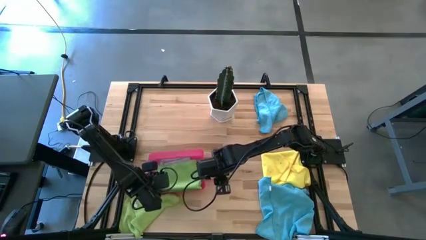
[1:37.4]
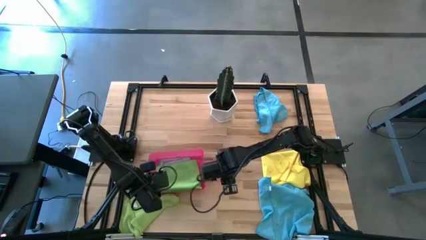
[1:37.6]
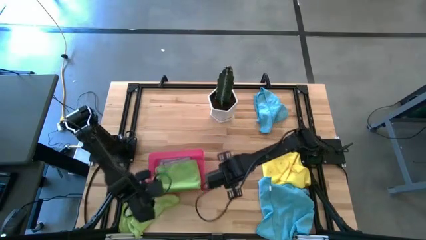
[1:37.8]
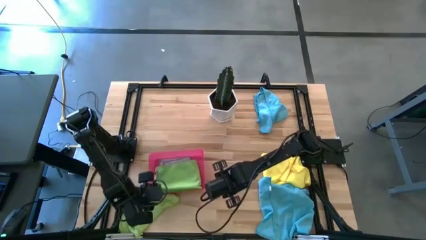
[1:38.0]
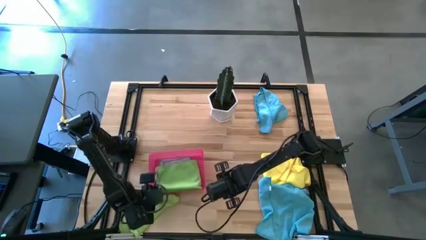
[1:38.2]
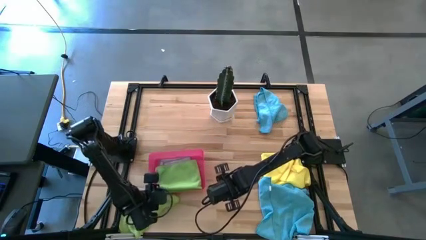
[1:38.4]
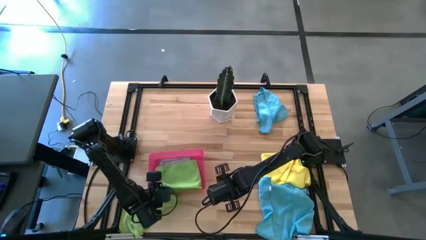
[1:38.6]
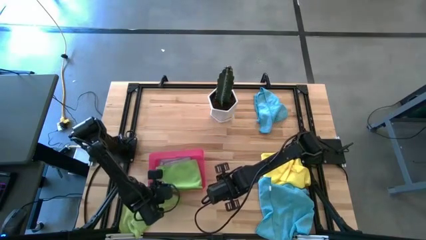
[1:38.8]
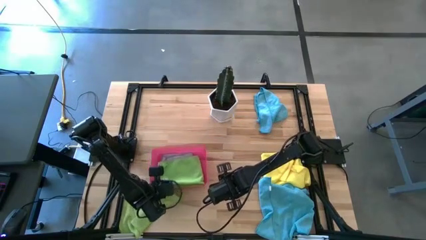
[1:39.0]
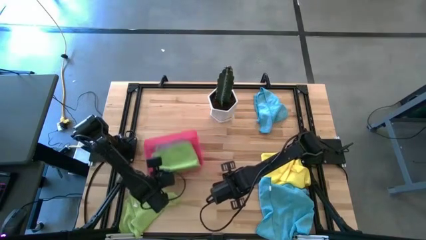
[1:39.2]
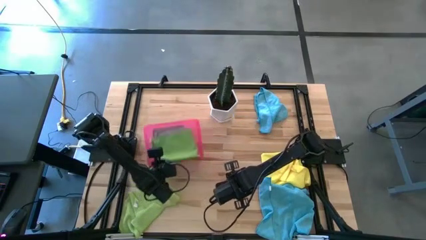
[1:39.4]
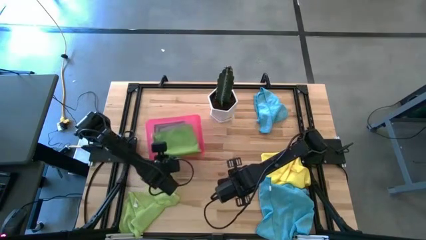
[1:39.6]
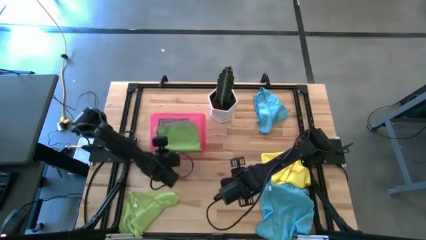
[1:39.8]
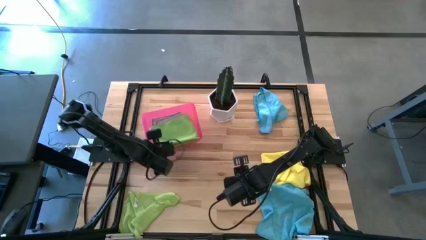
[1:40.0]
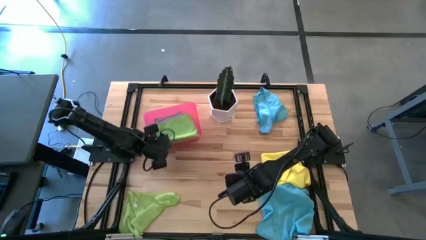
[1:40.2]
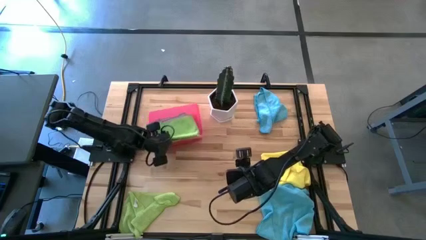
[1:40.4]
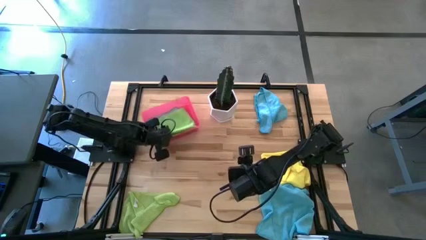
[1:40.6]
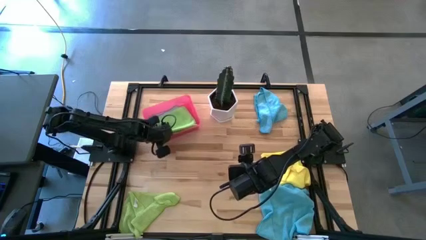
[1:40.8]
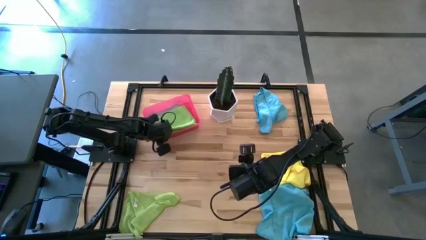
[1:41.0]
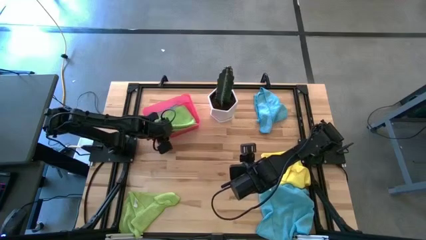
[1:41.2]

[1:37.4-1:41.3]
Task: Fold microfiber towels
Move the transparent pink bin to the top left of the table

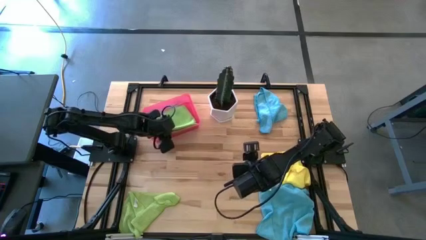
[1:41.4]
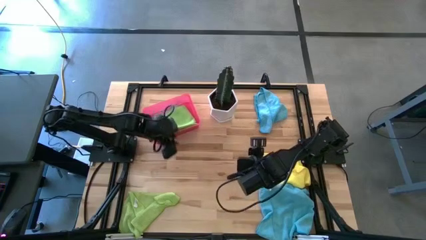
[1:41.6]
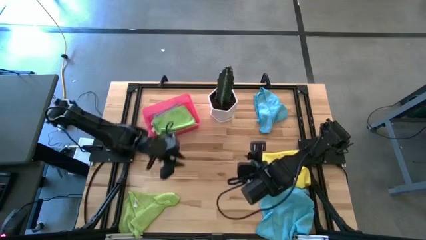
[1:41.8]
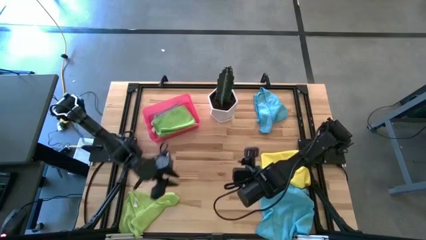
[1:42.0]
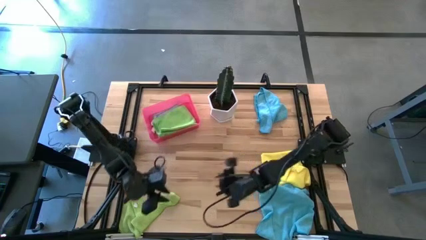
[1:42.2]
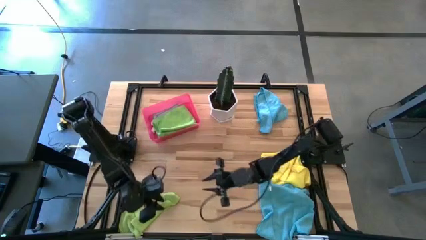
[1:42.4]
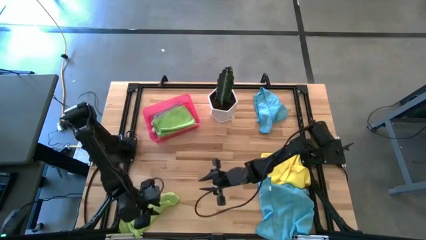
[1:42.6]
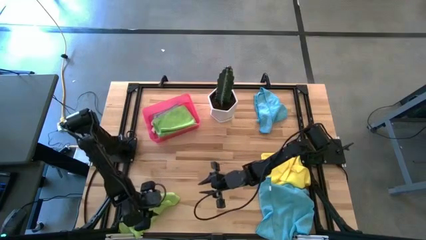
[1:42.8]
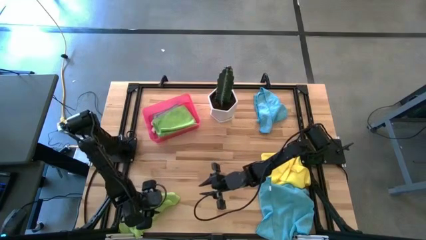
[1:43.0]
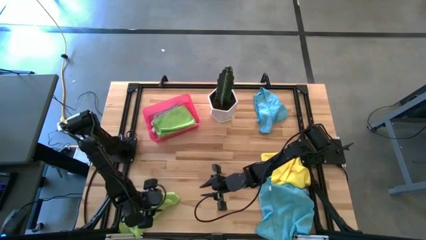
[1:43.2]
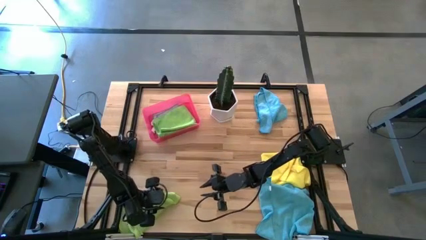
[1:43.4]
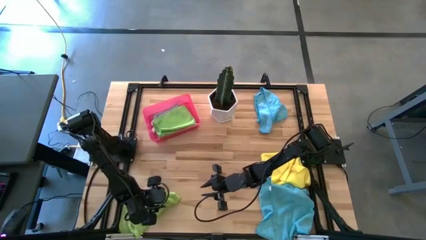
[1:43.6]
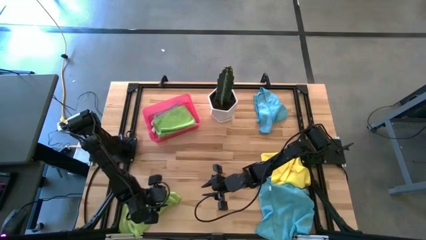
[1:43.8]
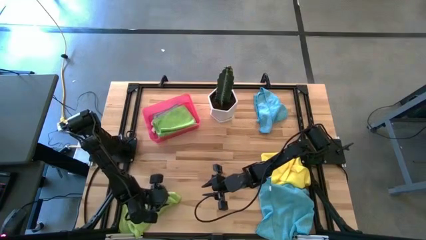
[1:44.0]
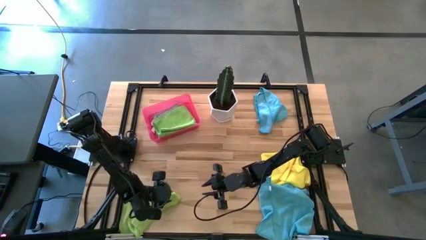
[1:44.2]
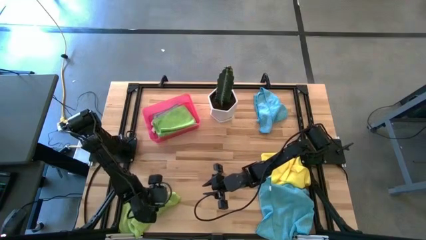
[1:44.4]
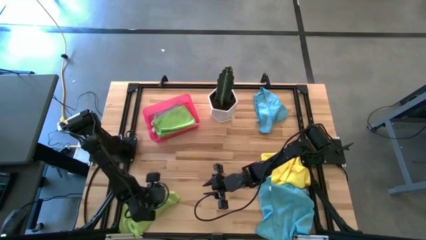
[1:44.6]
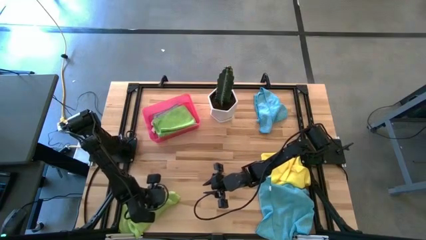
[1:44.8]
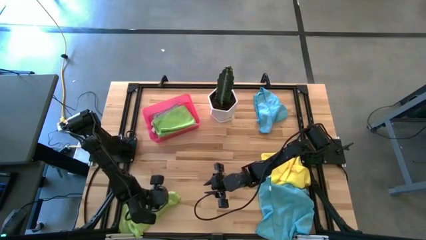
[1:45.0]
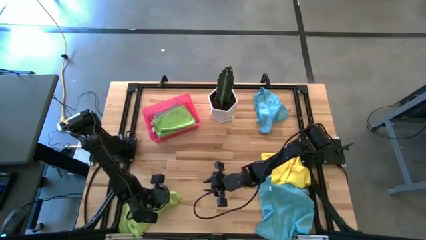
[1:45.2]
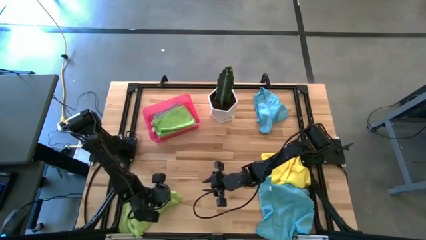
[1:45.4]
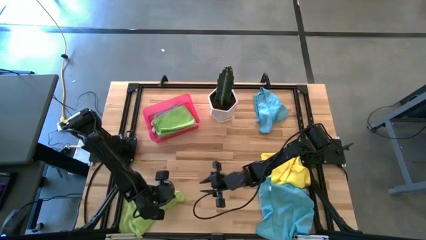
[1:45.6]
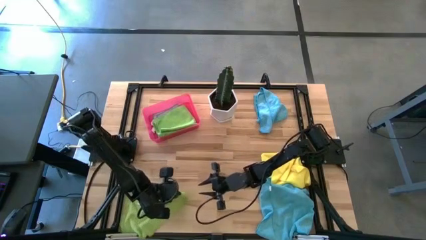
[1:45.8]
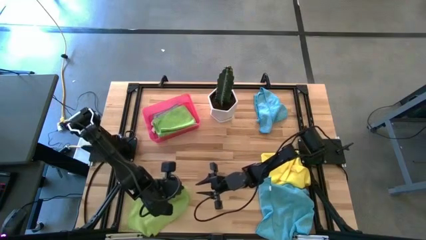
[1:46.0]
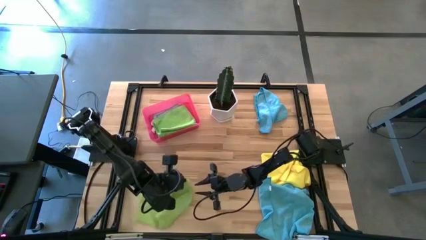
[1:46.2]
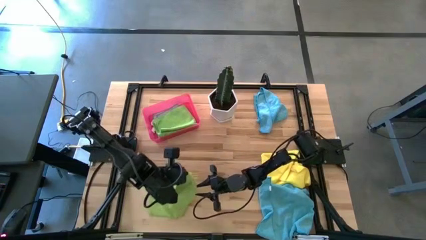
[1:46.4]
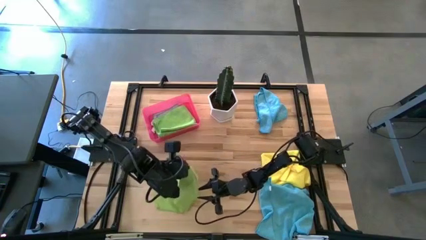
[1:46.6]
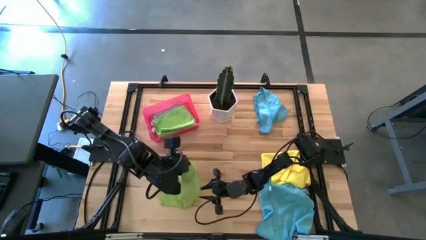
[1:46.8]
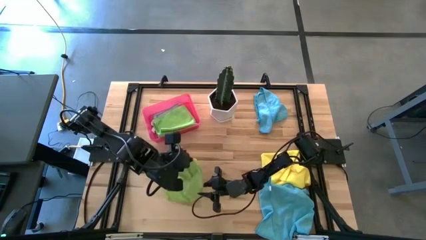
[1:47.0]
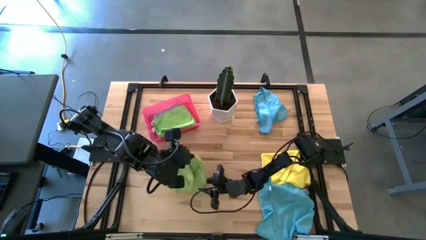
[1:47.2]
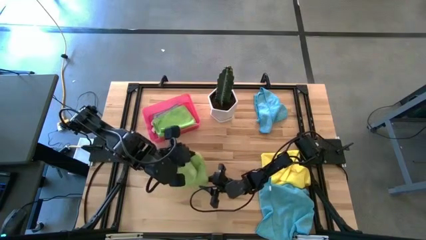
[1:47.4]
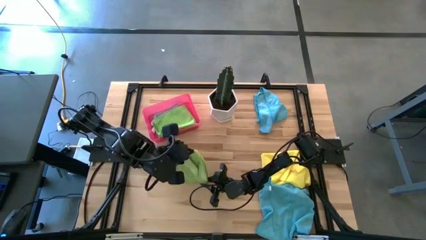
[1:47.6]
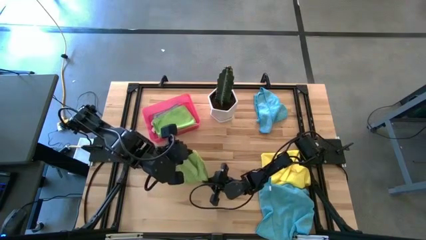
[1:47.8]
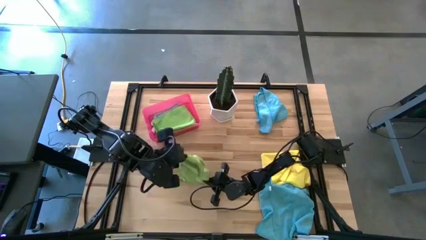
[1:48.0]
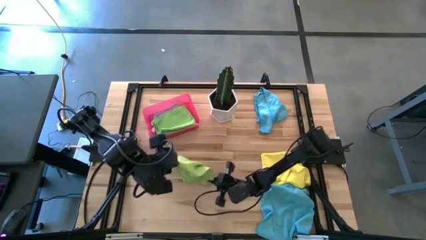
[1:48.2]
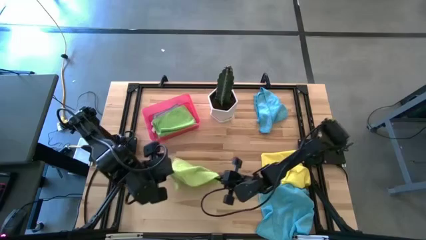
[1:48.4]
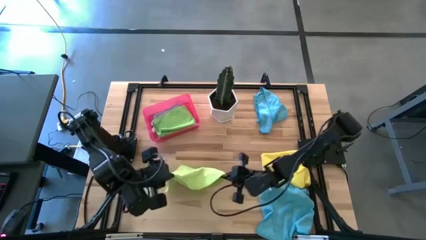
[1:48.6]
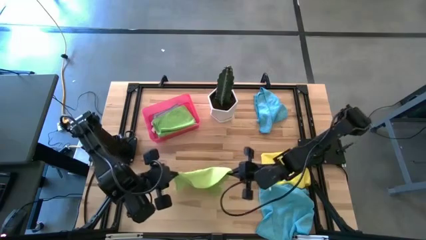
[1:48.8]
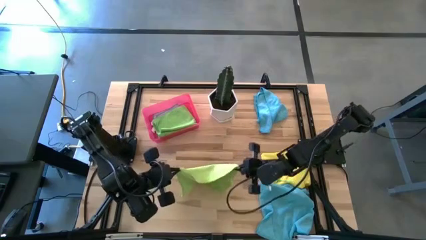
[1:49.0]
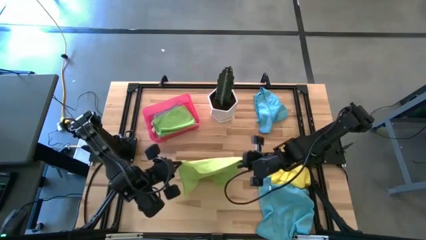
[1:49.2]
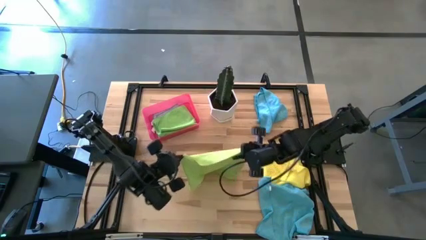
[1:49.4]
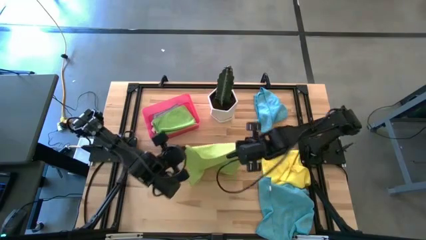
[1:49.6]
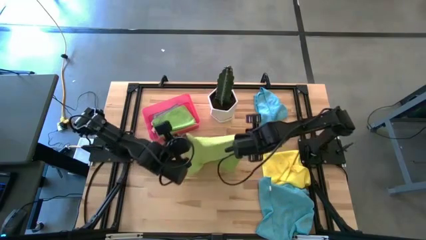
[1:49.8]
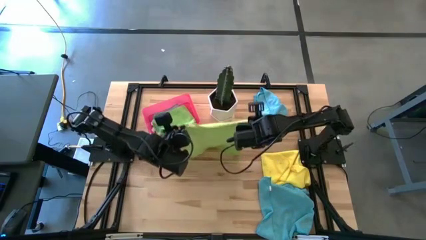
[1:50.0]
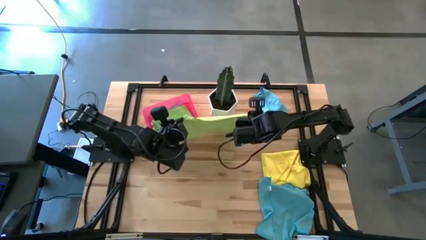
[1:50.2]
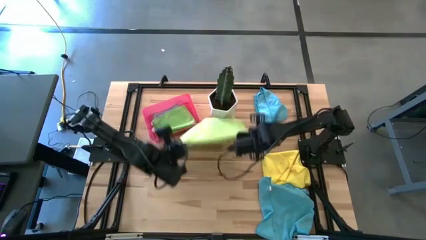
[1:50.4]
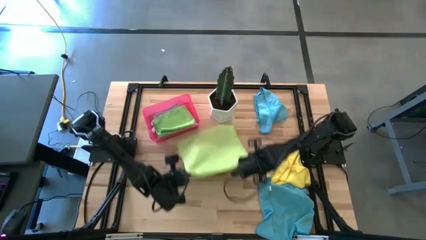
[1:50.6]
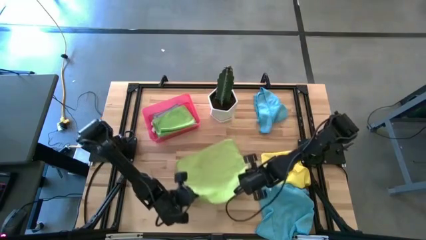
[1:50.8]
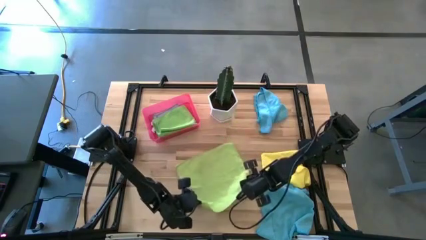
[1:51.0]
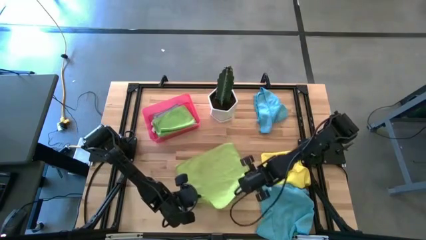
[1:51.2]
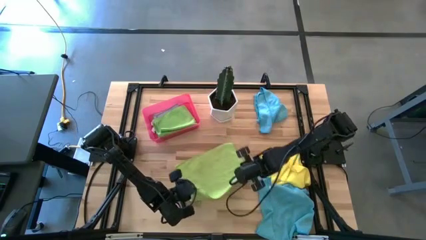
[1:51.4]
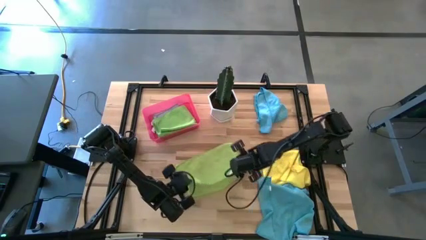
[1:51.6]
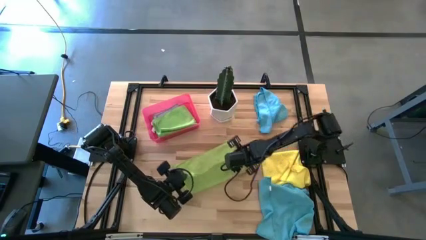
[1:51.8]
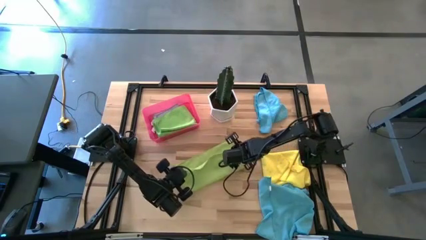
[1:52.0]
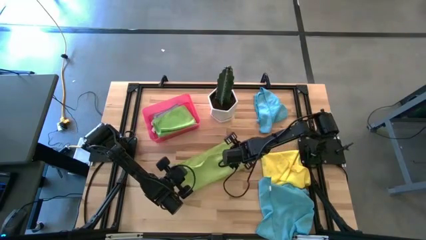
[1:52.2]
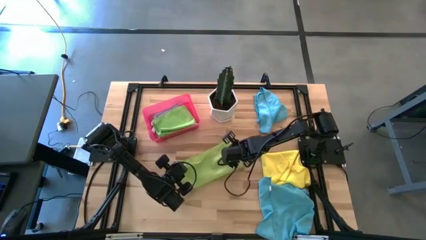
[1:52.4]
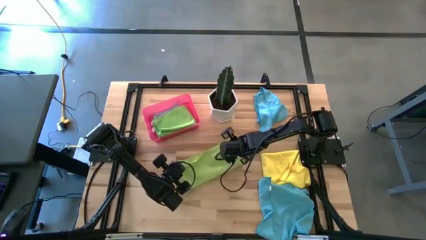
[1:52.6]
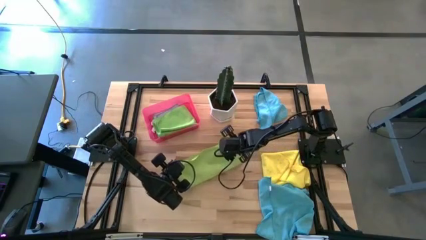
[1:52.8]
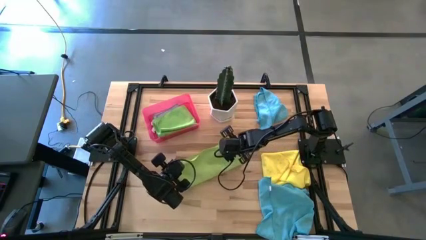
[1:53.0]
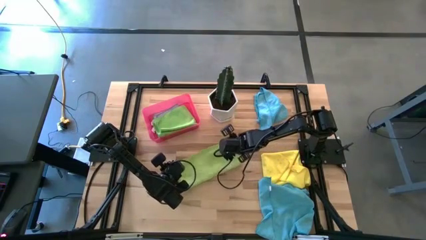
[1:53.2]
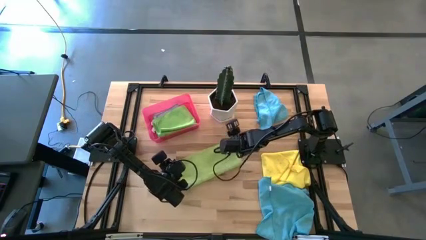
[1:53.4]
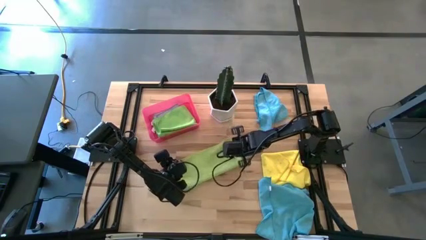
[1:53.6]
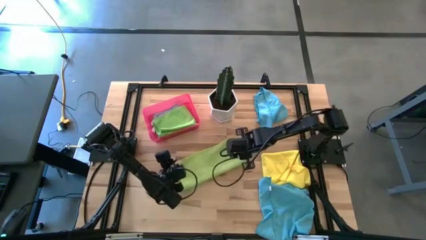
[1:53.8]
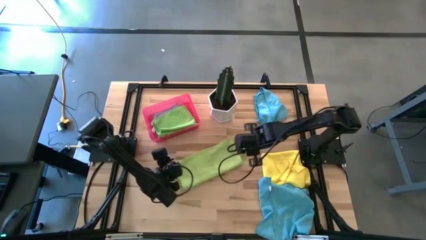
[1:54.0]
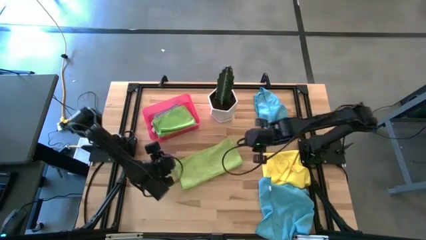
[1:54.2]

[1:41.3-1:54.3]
Fold the light green microfiber cloth
